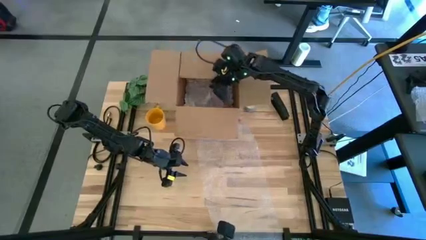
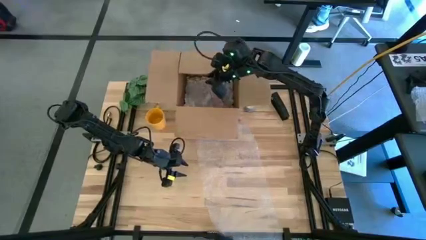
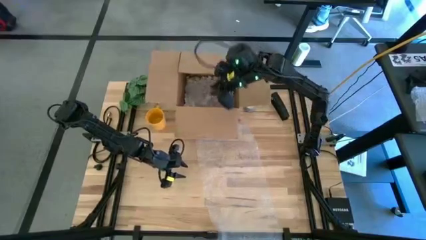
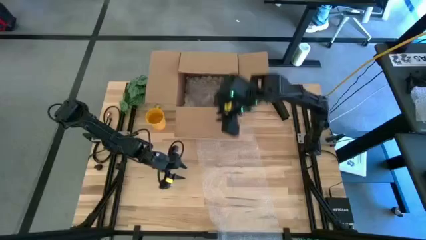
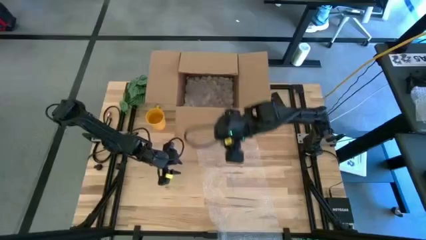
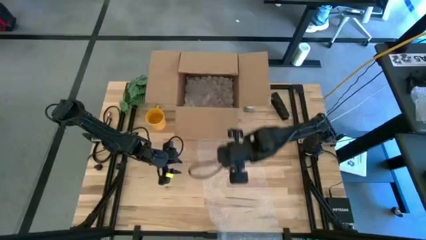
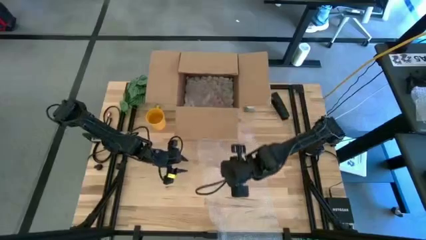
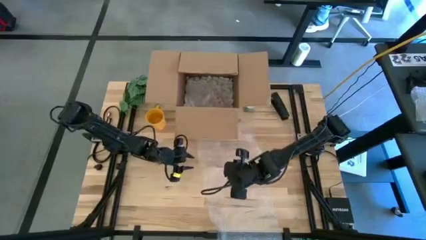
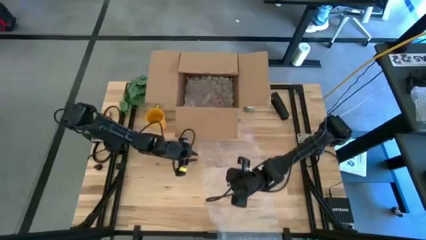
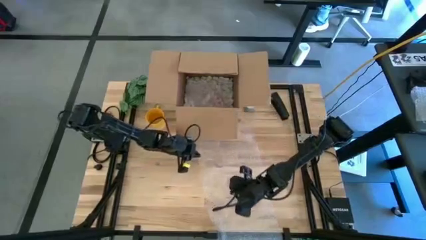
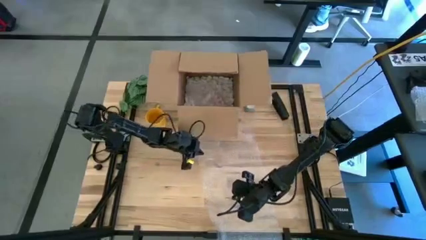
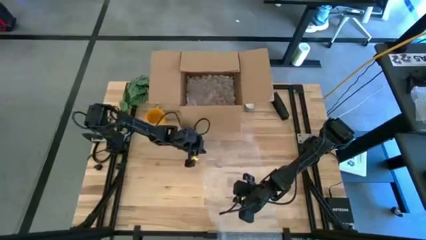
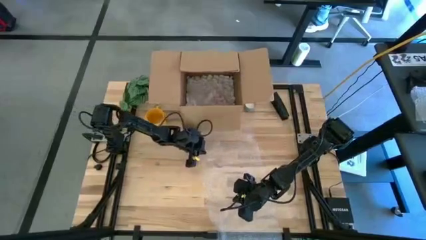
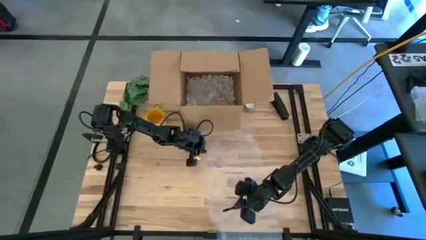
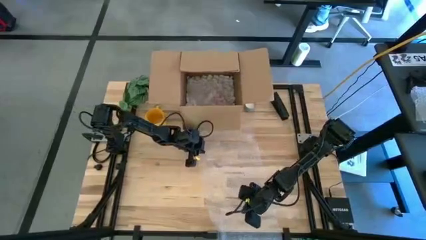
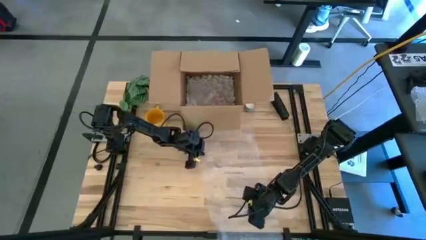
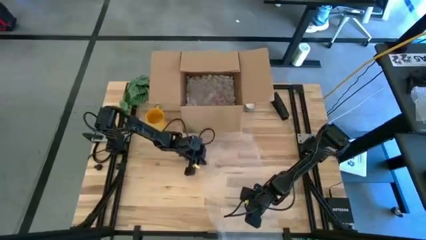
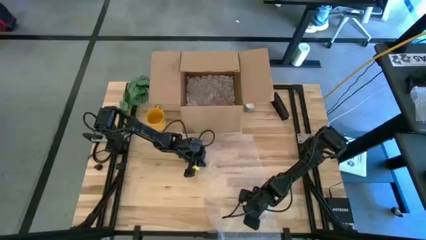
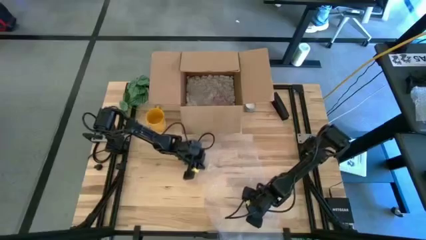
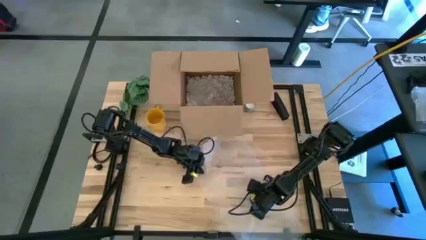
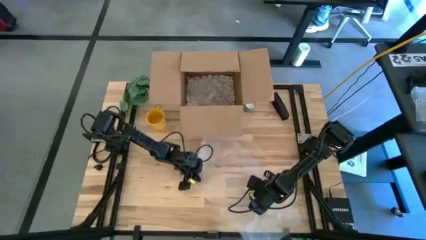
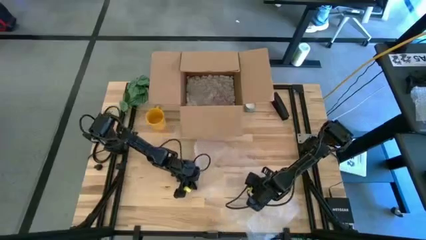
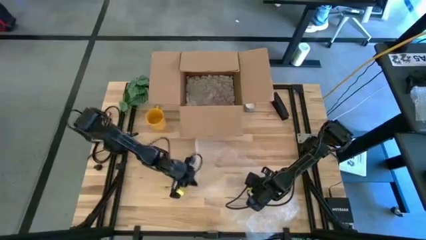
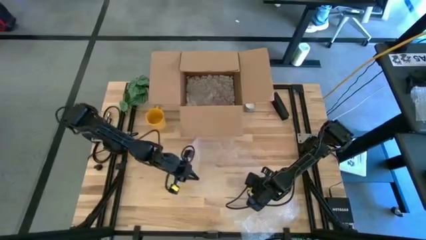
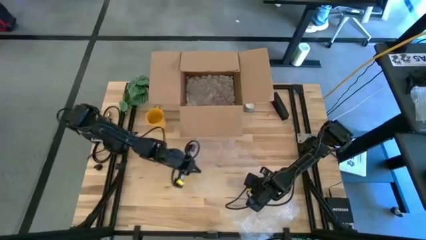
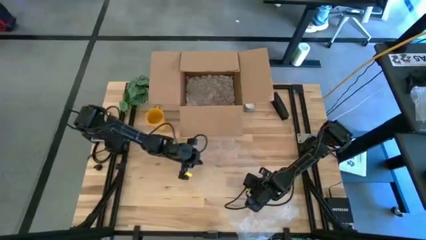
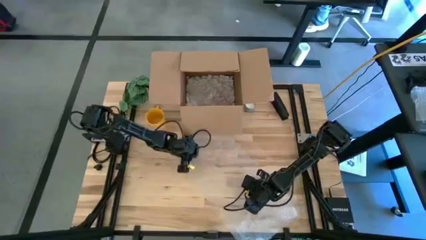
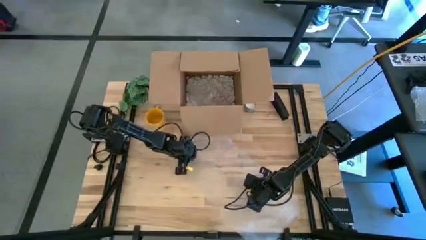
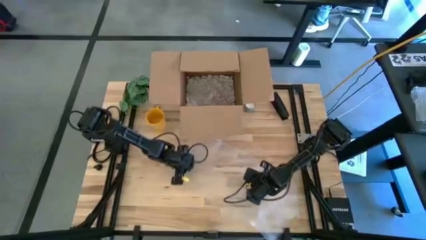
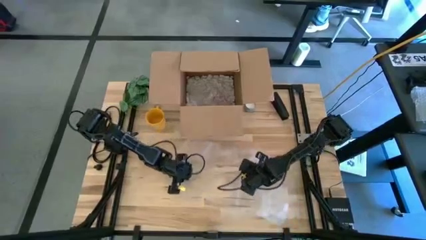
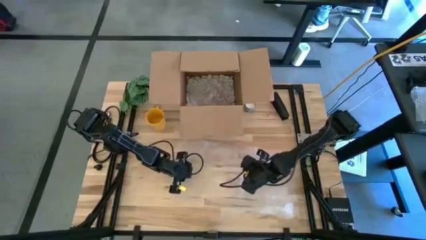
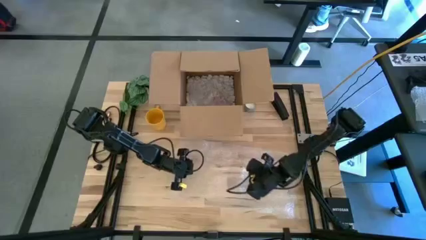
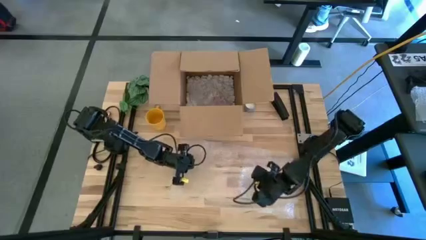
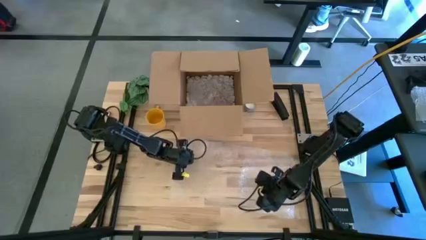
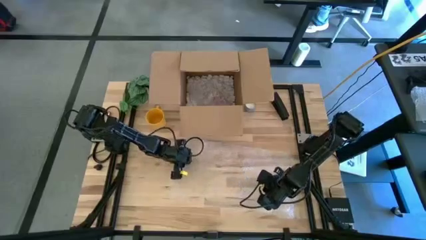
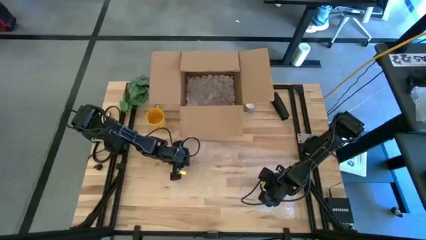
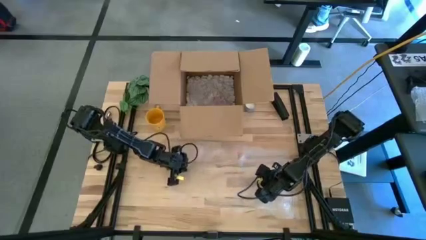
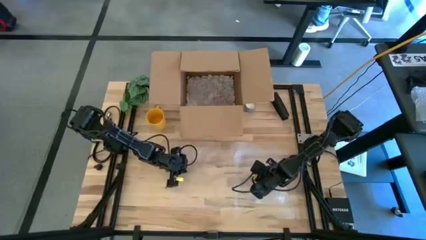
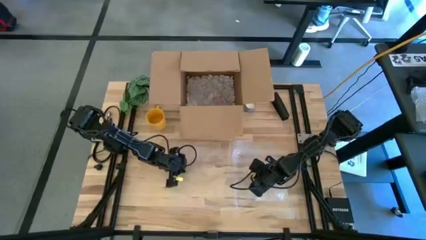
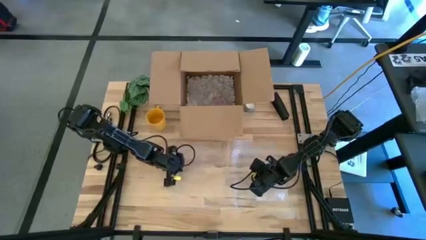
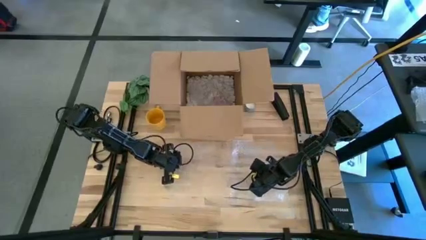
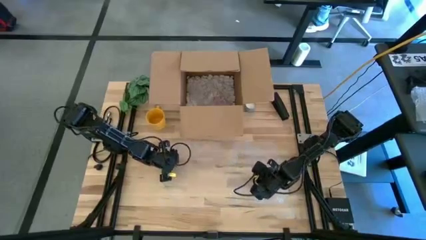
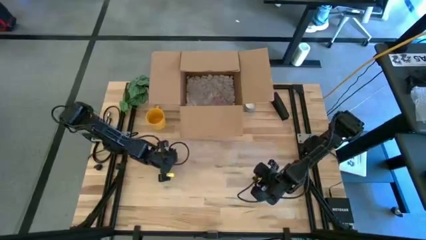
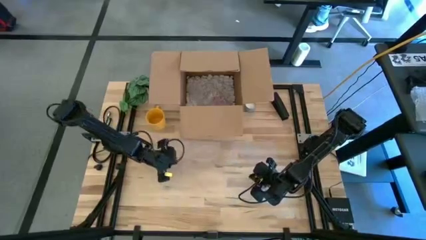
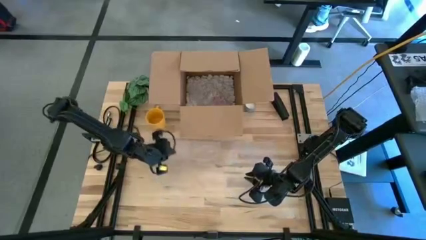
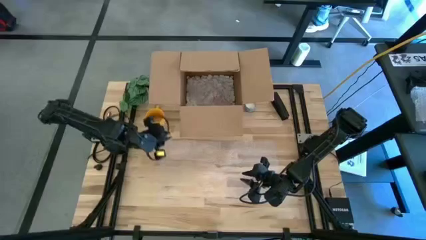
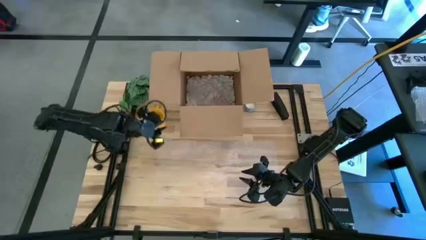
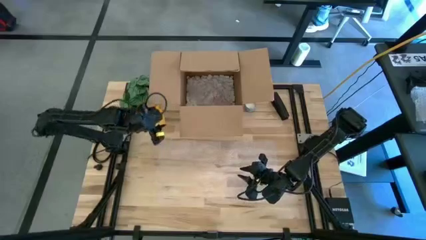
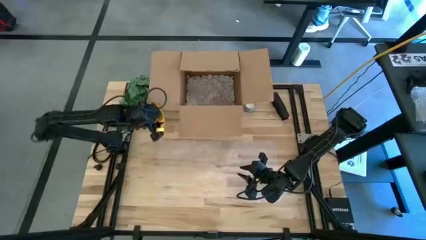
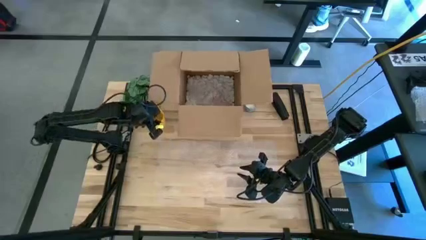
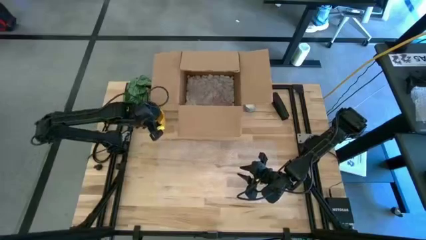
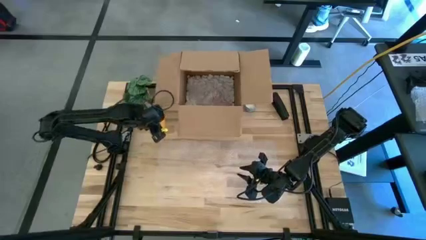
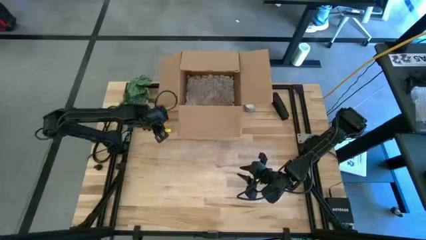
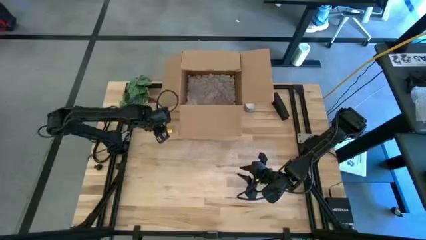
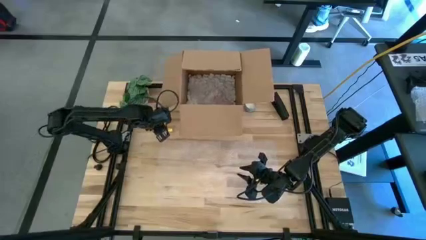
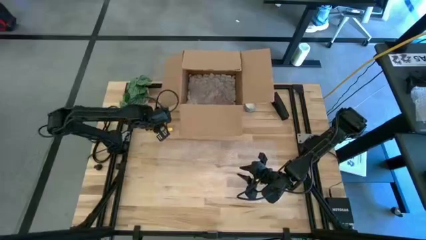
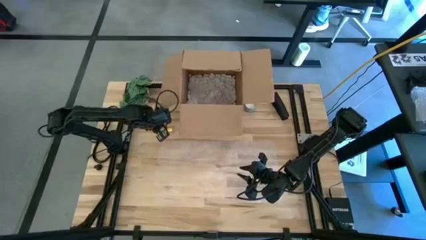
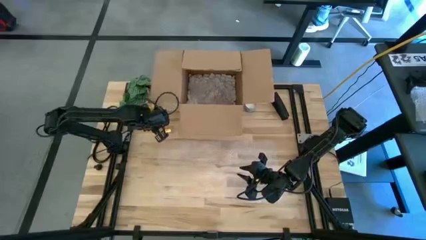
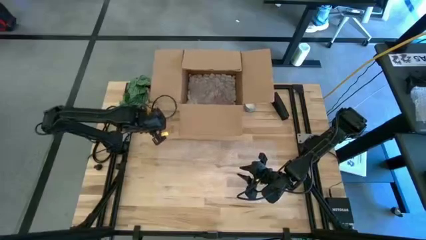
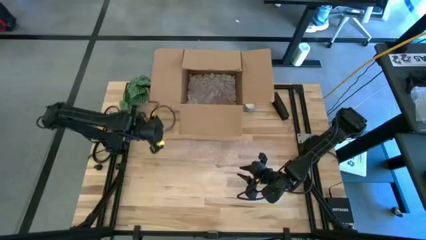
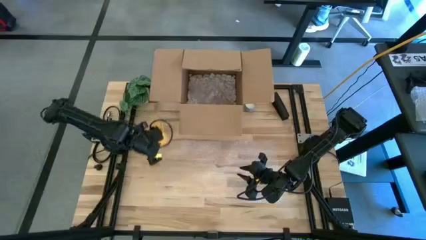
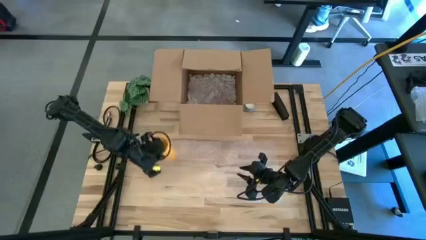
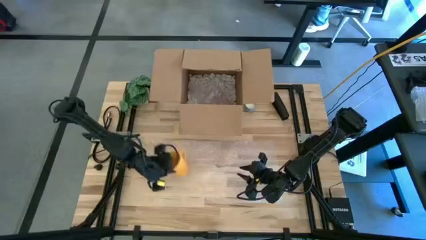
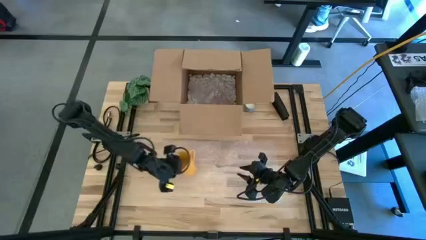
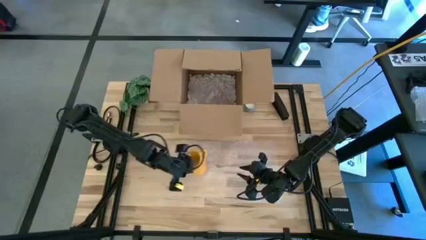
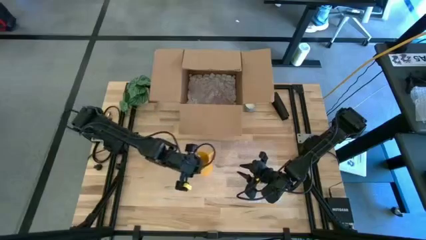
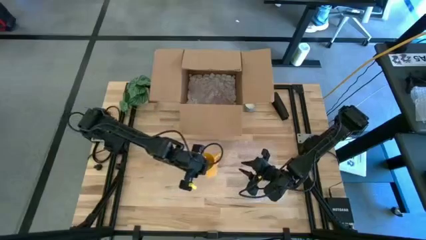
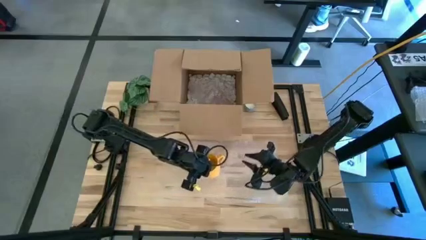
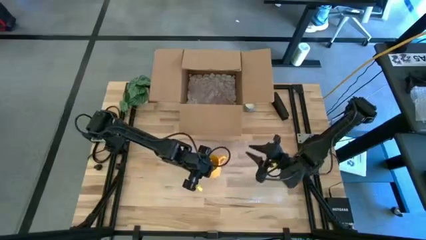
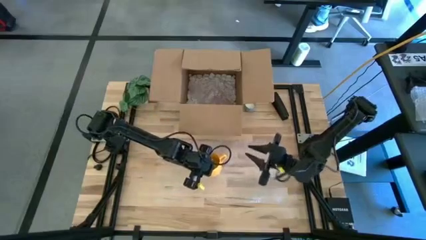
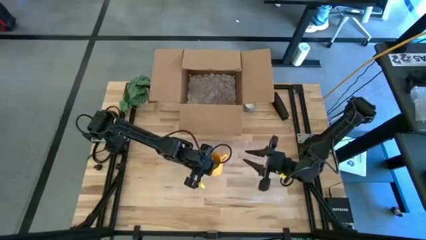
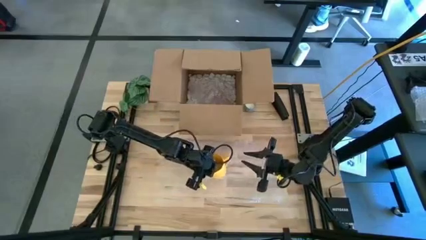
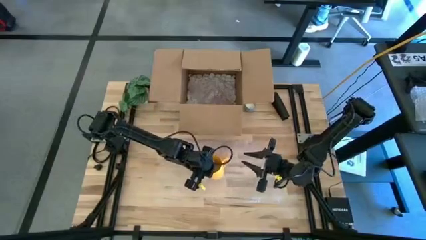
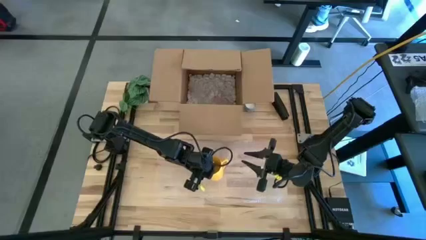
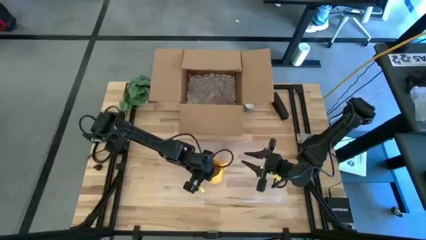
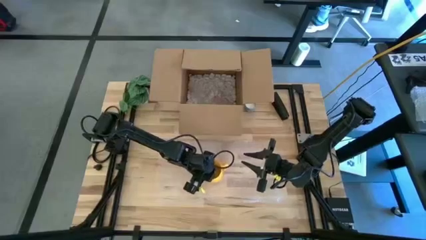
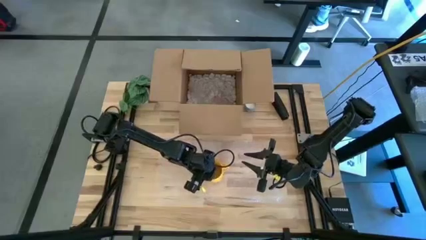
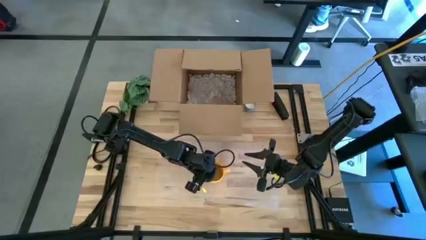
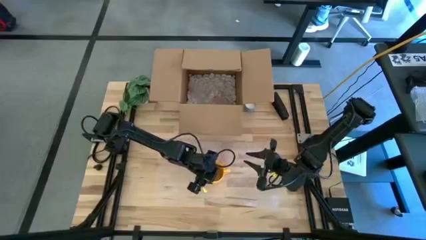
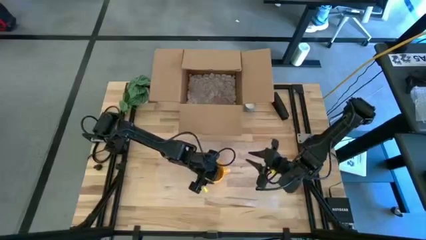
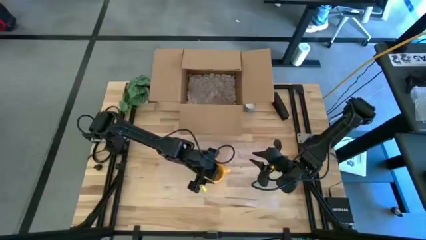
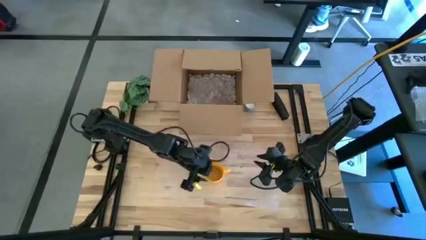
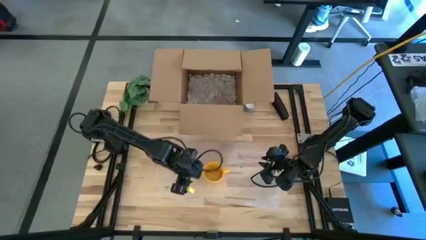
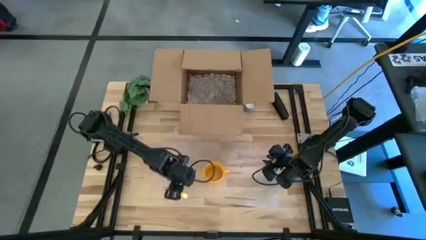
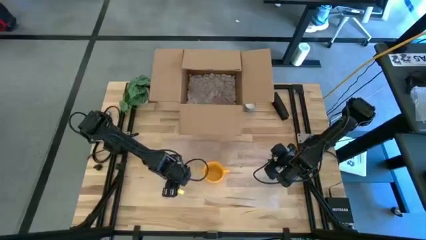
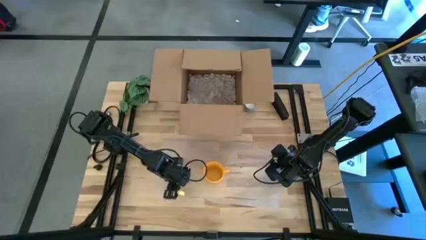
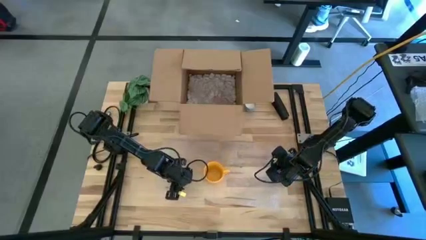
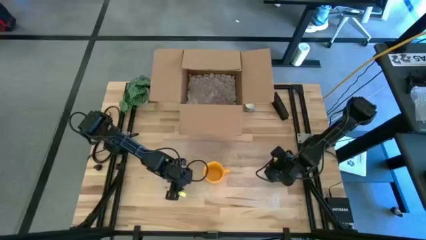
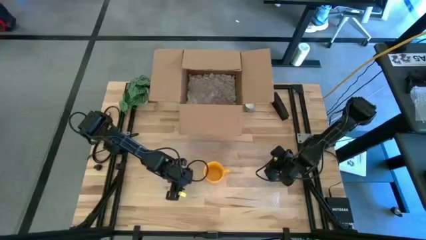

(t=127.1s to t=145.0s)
Task: wrap mug
Wrap the yellow mug with the bubble wrap
